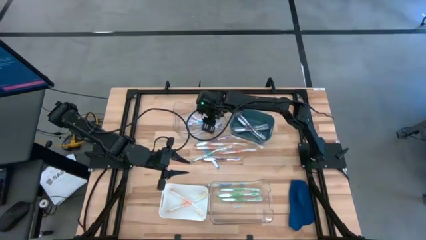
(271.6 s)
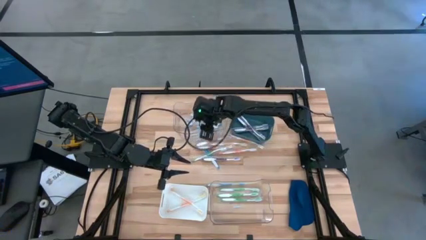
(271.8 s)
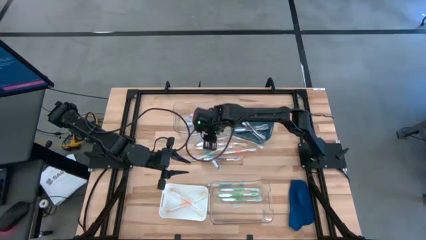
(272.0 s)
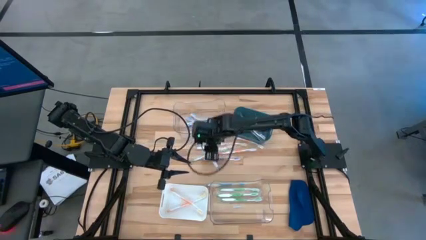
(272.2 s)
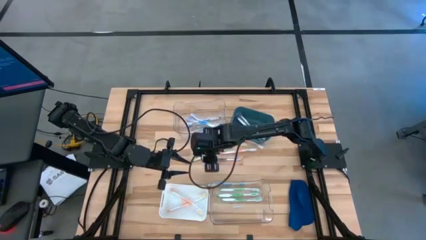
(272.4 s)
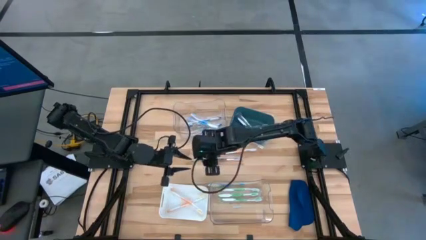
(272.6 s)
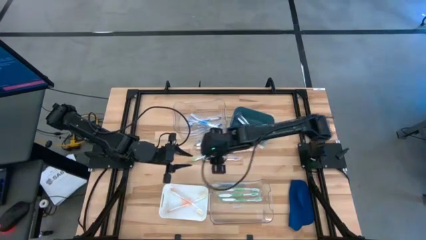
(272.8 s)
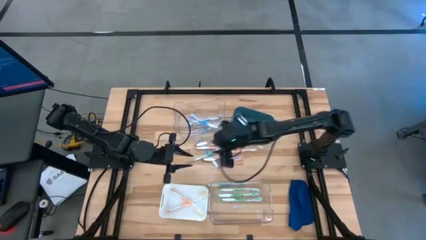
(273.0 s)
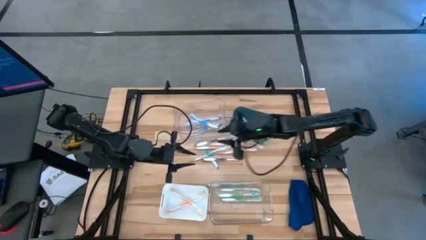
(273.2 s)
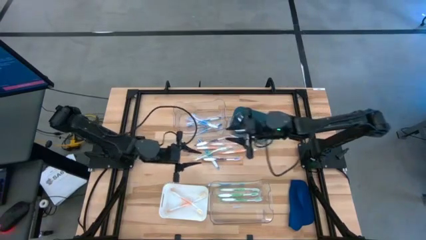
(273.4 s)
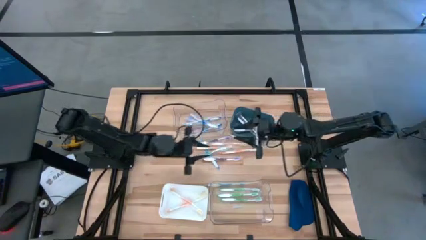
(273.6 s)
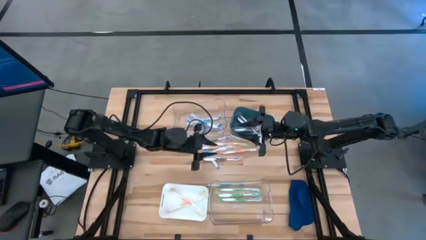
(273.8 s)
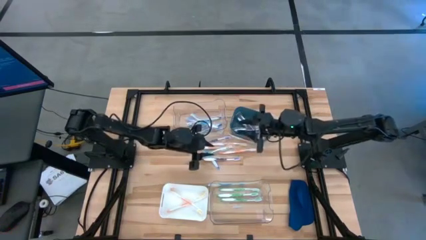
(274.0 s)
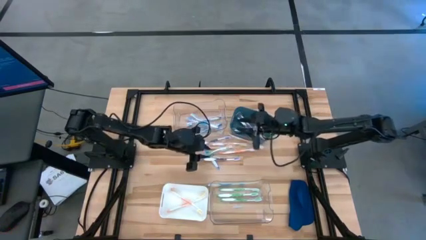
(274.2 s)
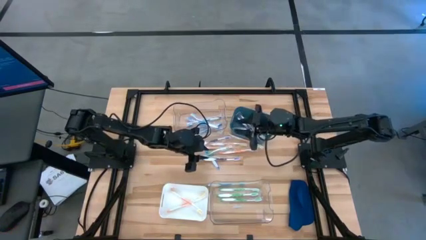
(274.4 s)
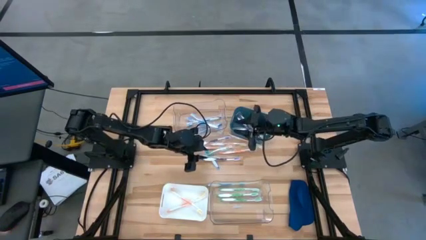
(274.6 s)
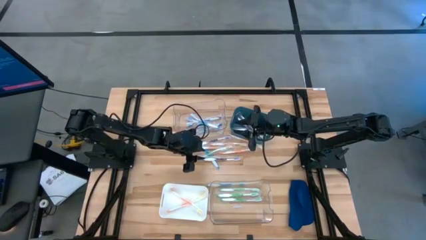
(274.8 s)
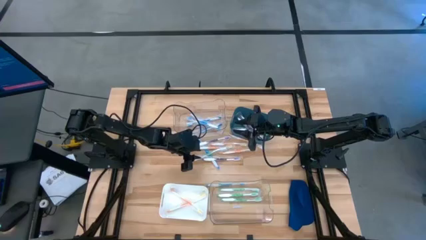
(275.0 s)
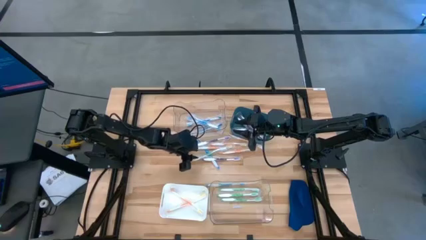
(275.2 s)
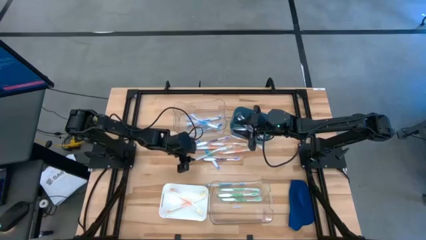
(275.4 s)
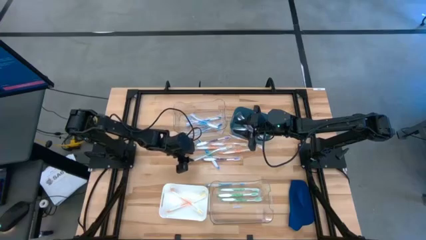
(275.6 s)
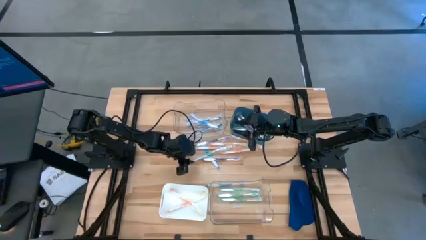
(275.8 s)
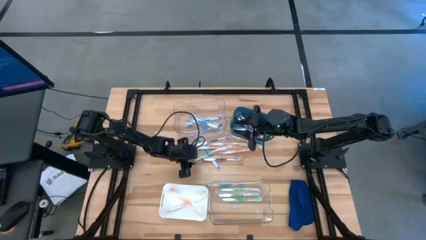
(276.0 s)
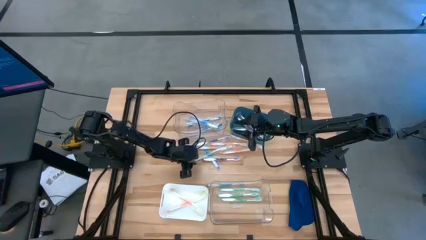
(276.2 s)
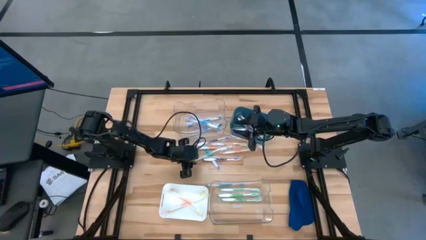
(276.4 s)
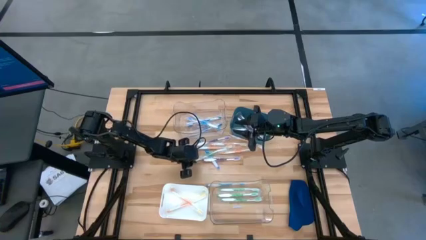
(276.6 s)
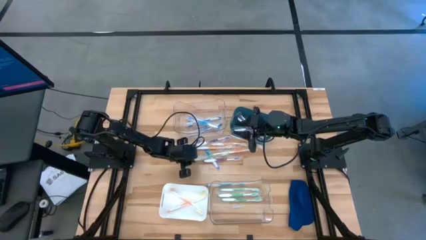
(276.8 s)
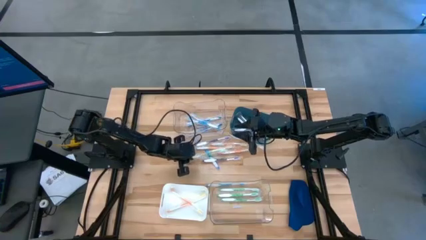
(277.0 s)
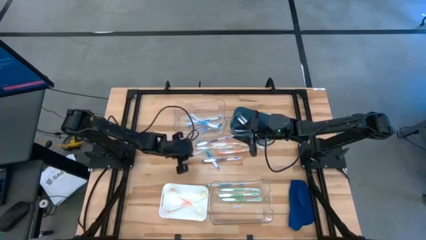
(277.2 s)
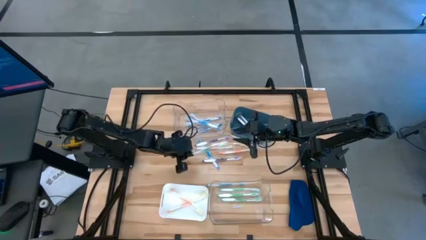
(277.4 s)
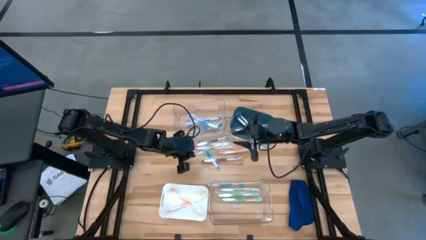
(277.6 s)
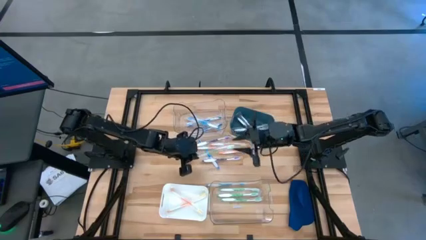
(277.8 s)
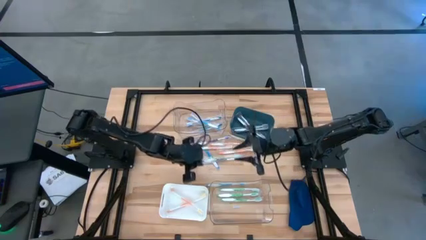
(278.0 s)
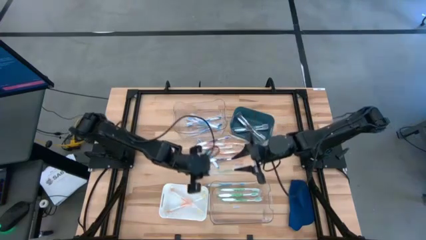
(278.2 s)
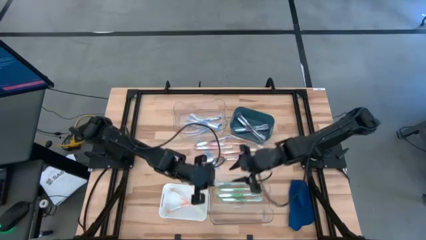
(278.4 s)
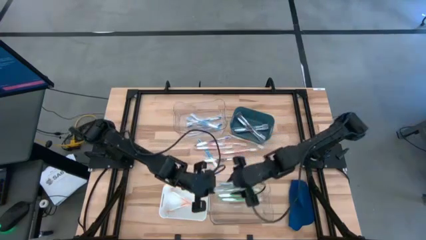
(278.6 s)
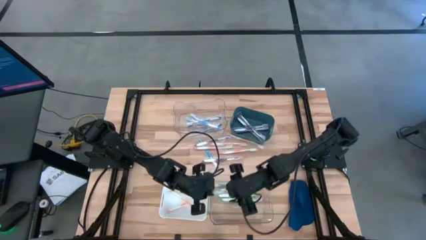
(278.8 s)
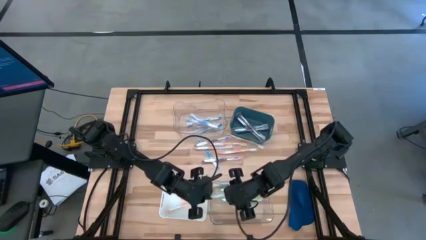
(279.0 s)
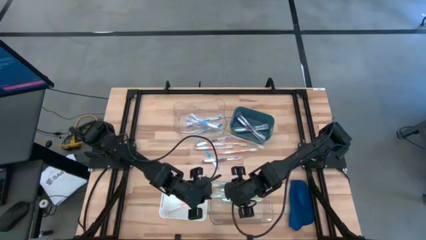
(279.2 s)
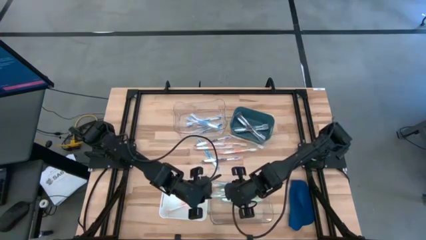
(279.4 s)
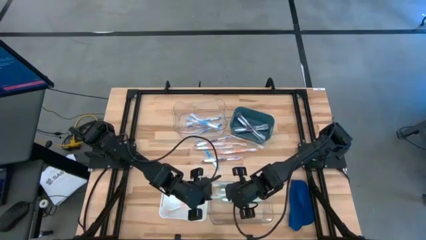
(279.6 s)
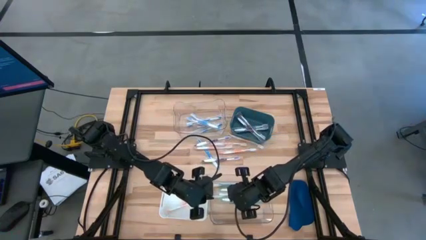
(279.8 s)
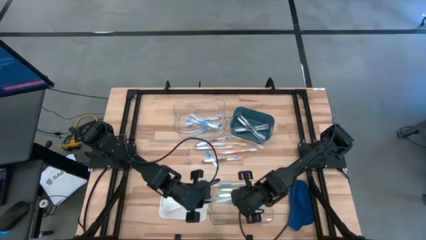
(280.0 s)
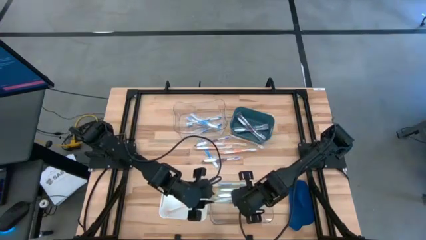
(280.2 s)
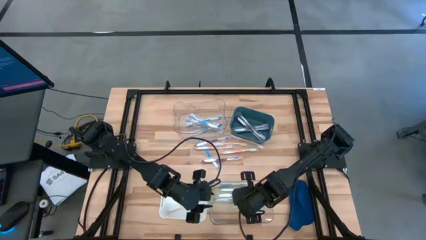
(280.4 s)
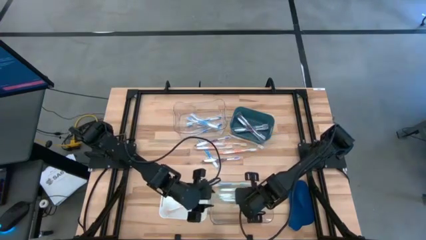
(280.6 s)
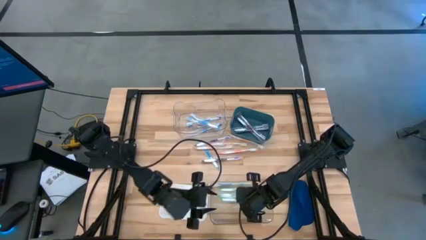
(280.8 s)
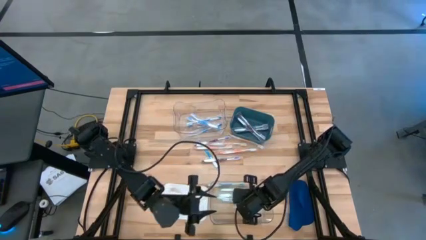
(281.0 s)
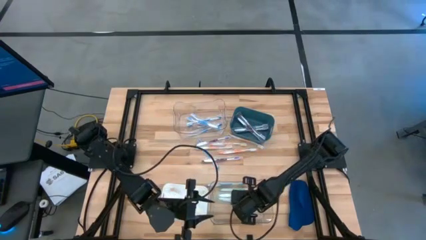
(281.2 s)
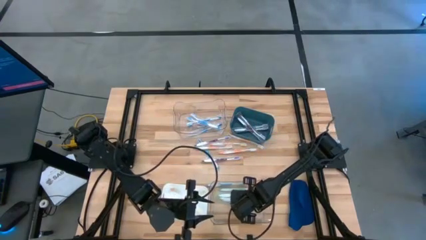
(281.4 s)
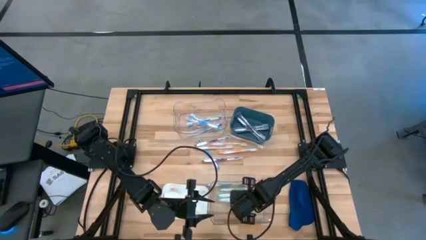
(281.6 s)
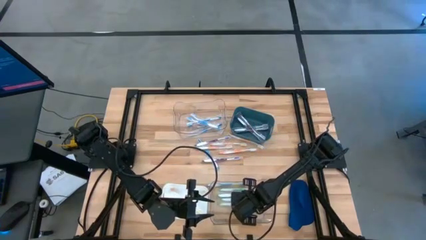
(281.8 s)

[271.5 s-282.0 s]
Task: Pick & Place Toothbrushes
Put the green toothbrush into the bottom transparent bin
